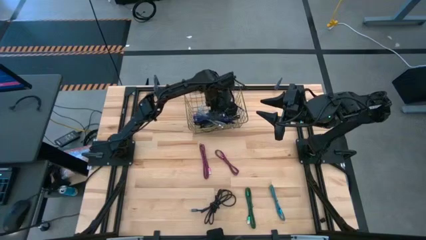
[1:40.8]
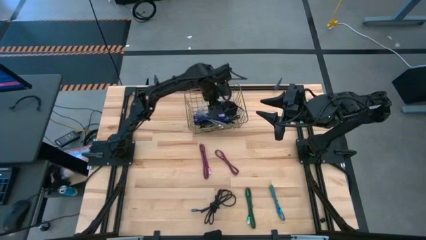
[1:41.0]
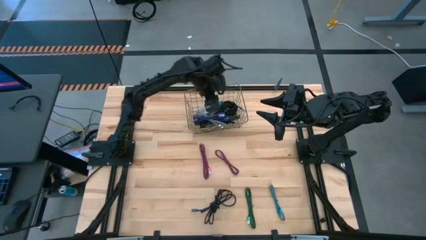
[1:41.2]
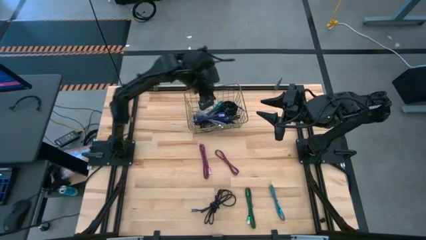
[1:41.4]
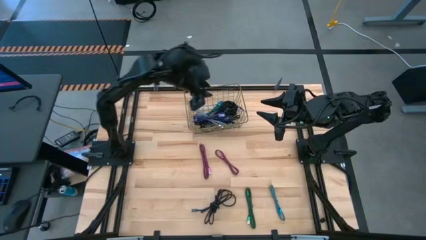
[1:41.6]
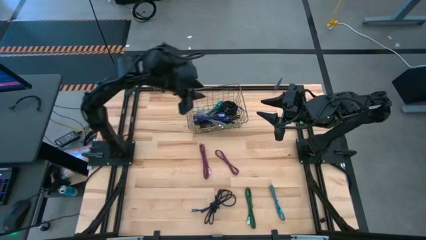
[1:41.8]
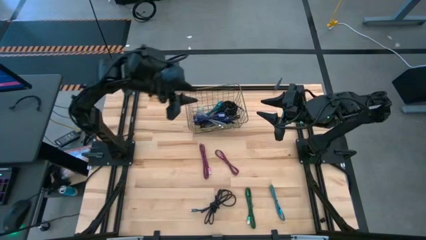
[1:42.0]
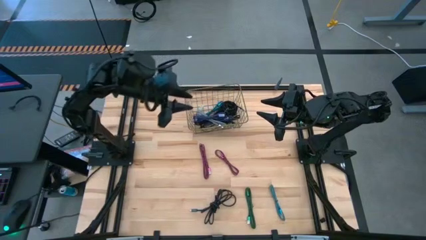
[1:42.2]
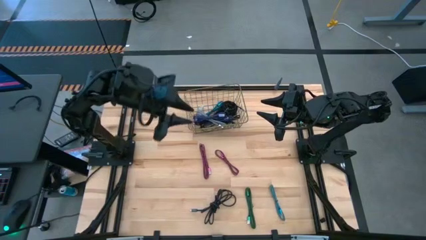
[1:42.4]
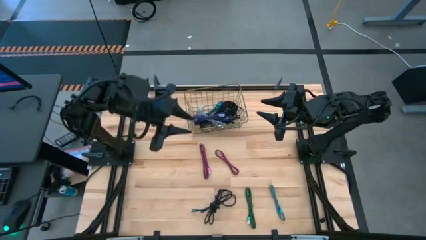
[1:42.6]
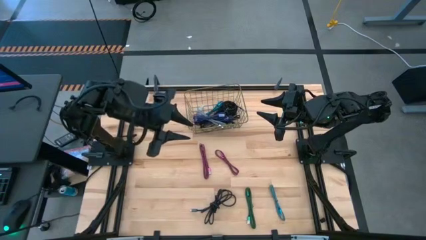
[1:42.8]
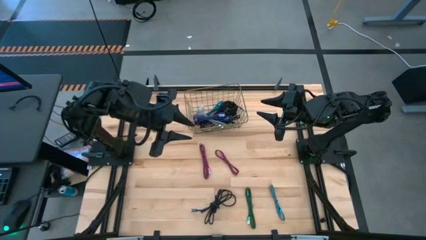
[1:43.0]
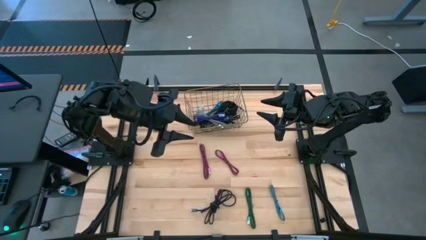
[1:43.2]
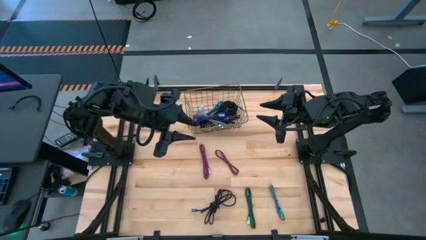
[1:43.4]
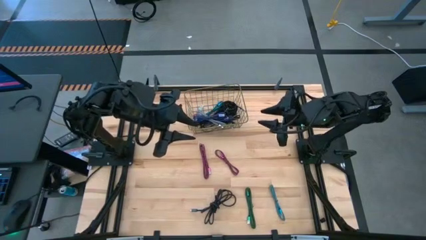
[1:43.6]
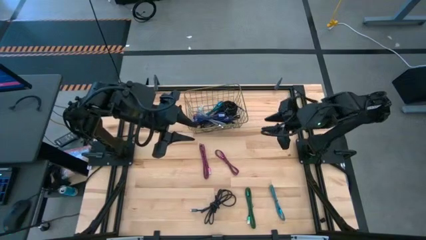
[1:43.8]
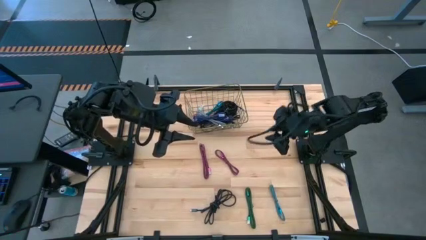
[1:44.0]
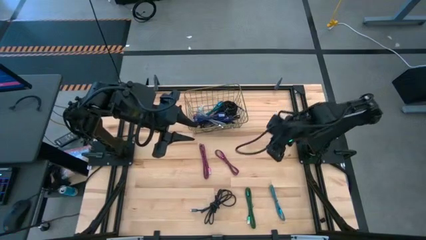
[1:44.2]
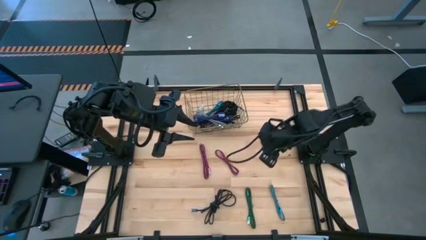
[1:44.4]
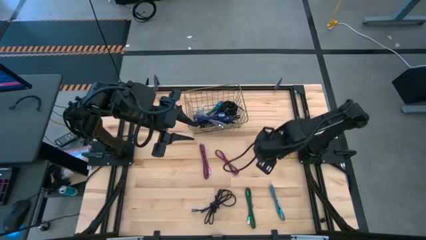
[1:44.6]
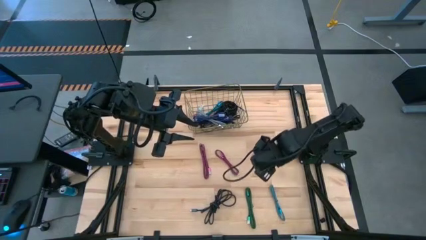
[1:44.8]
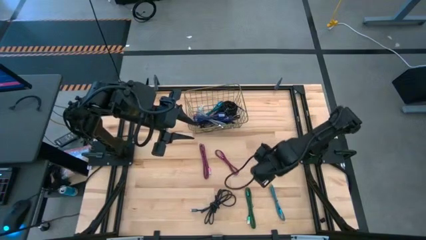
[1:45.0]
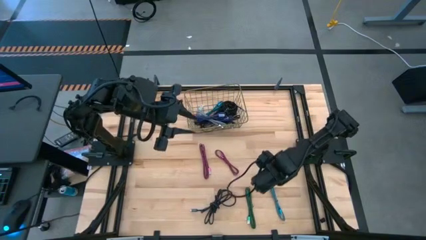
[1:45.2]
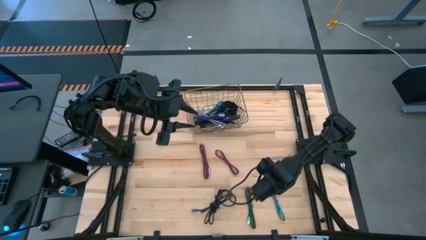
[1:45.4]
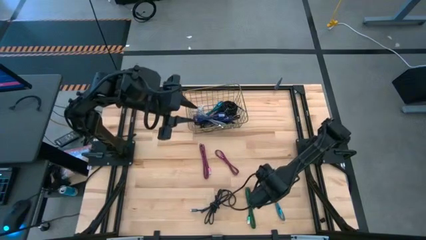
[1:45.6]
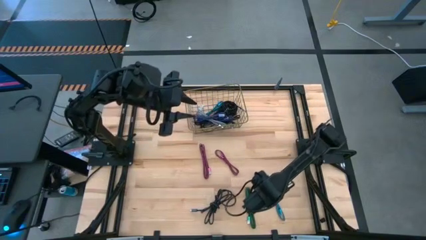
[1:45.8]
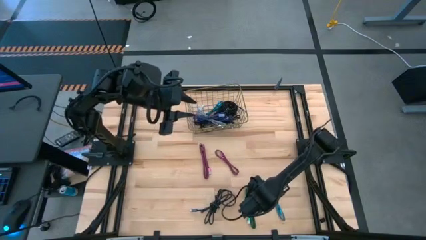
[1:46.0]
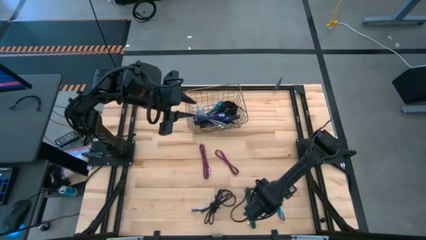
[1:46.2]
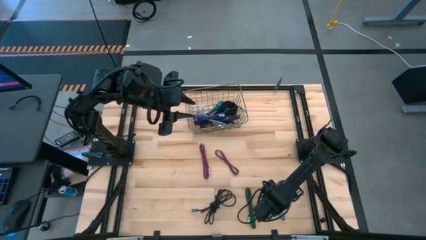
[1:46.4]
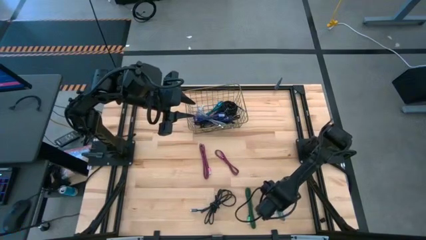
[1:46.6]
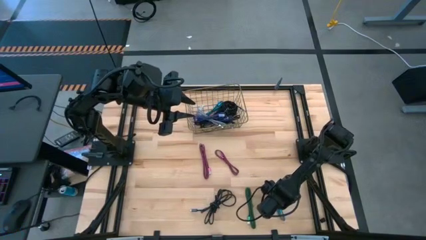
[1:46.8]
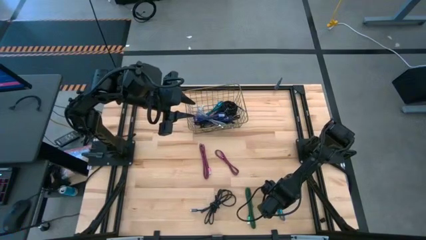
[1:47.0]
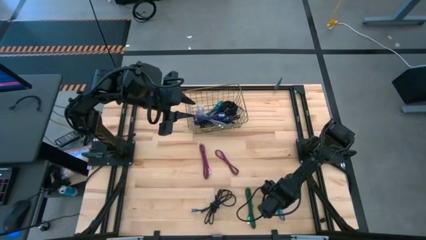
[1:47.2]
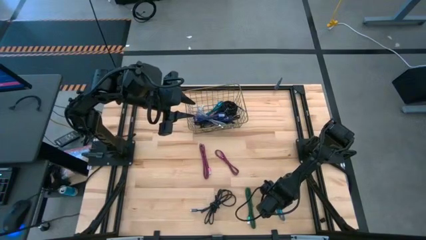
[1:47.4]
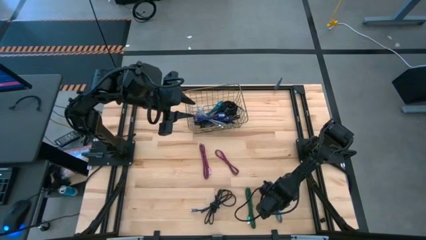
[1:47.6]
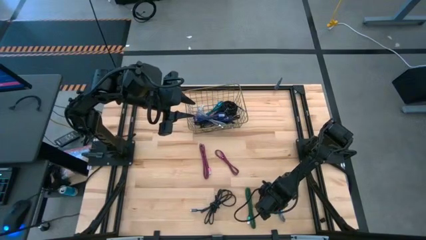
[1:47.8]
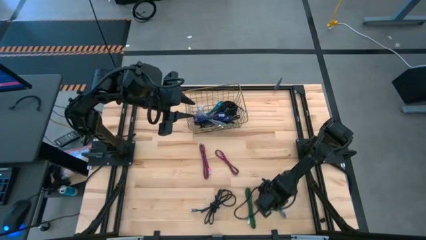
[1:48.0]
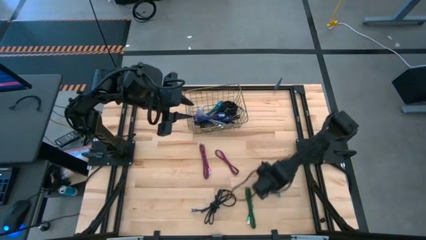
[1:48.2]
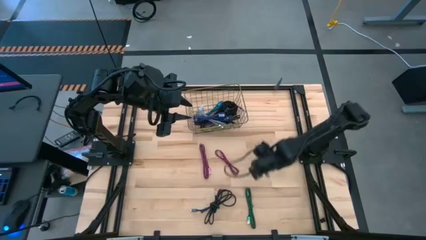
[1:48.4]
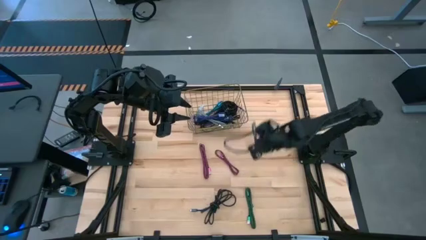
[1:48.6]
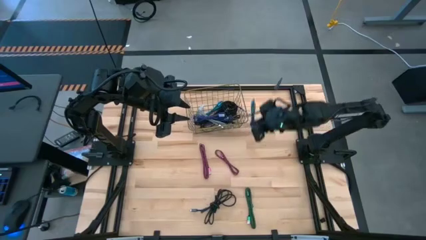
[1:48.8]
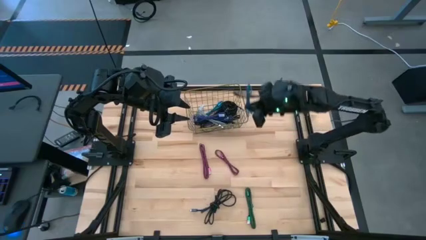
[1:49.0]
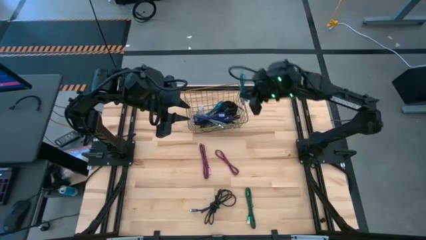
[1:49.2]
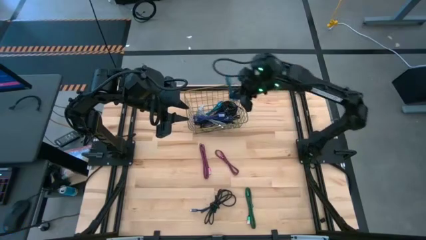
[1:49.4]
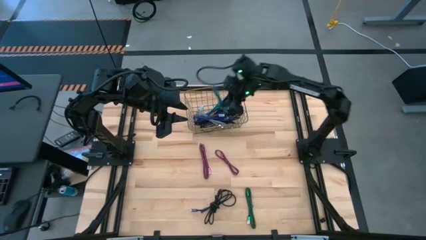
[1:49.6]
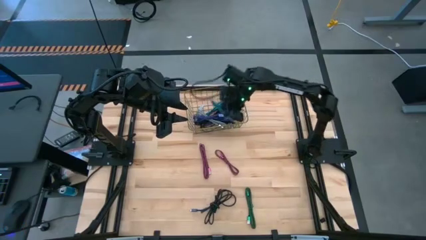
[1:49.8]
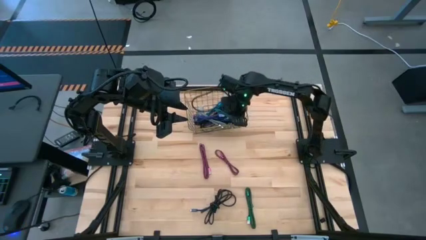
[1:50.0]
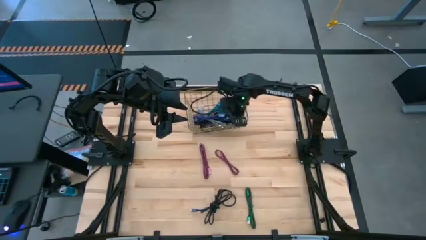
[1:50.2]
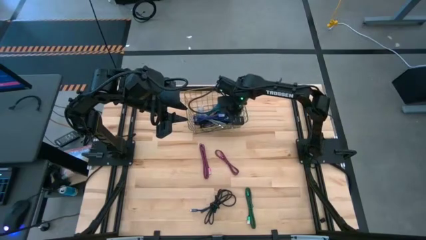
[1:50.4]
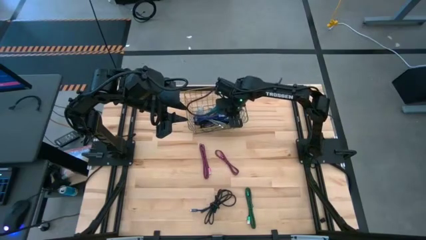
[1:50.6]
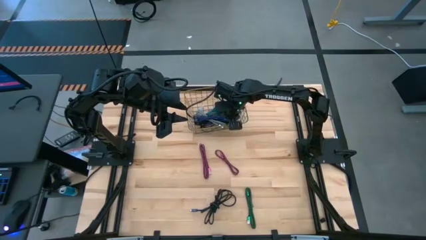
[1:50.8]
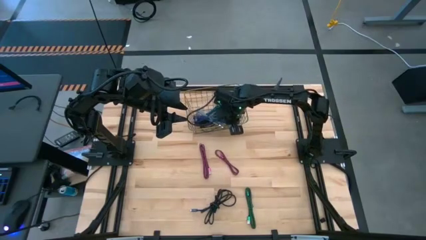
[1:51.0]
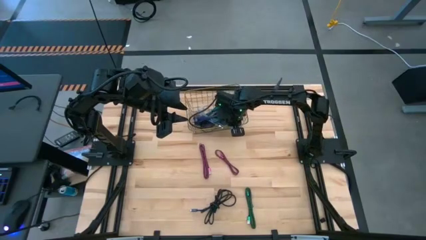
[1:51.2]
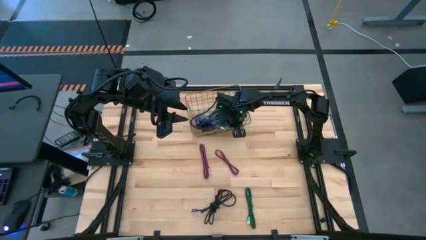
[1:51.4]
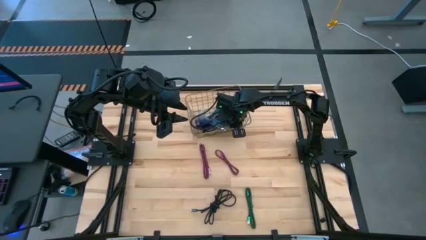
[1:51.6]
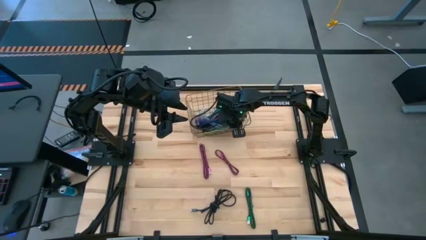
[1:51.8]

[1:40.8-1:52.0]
Task: Pick and place USB-C Cables
Put the light blue charger cable into the wire basket

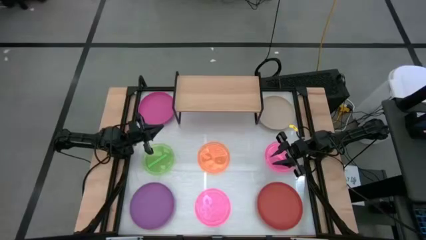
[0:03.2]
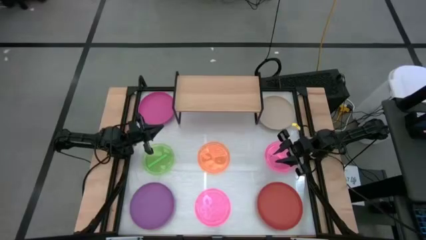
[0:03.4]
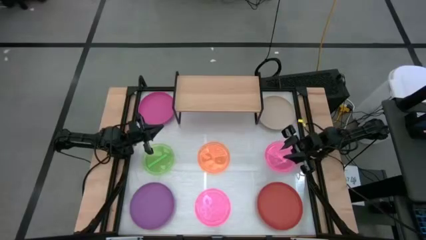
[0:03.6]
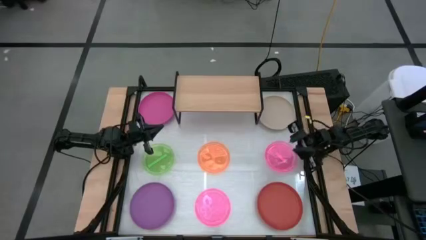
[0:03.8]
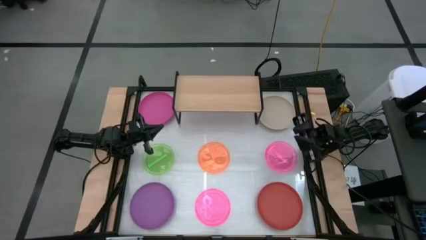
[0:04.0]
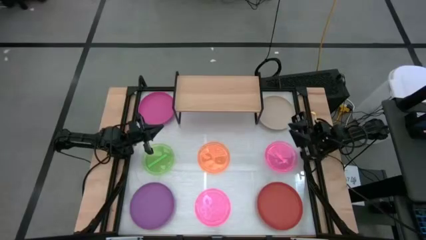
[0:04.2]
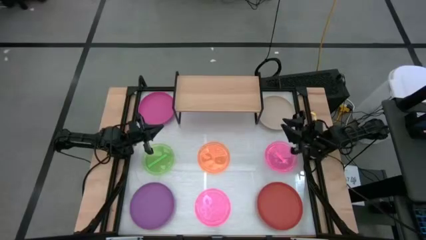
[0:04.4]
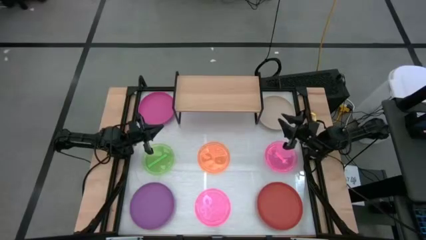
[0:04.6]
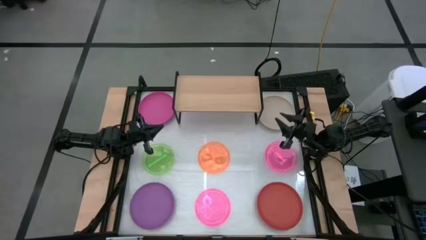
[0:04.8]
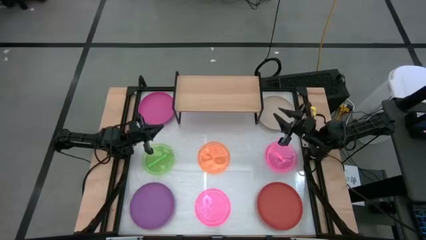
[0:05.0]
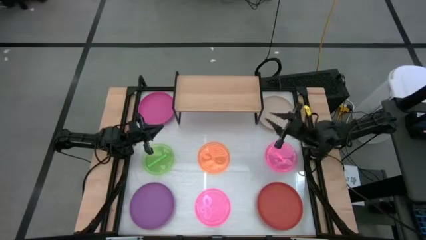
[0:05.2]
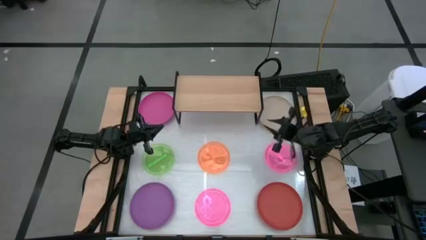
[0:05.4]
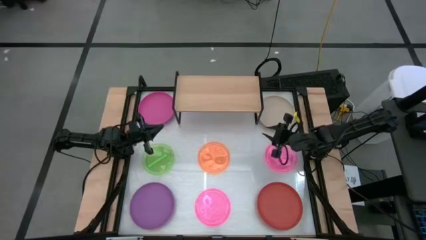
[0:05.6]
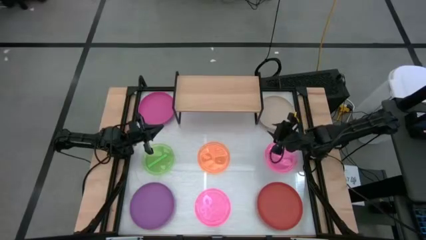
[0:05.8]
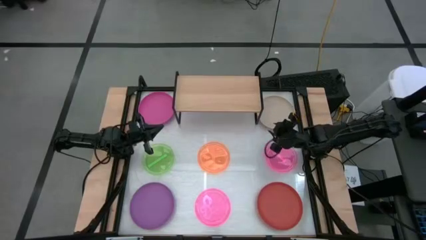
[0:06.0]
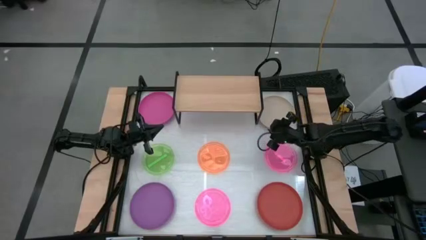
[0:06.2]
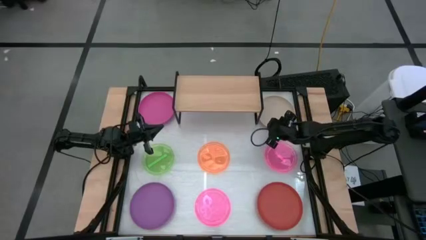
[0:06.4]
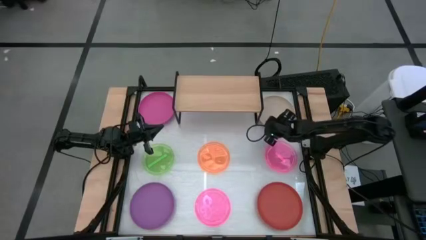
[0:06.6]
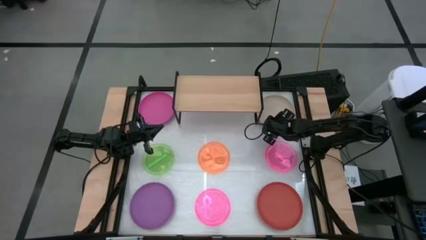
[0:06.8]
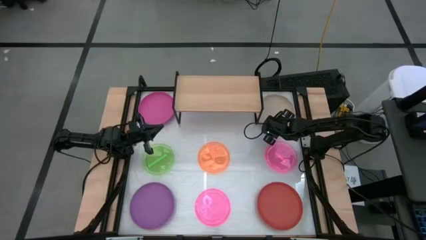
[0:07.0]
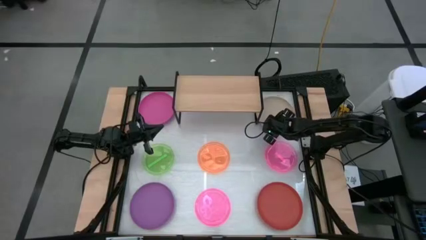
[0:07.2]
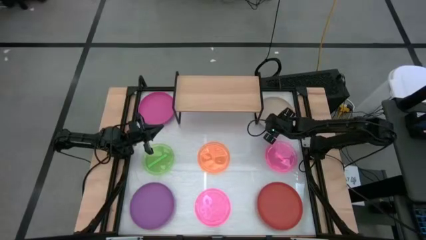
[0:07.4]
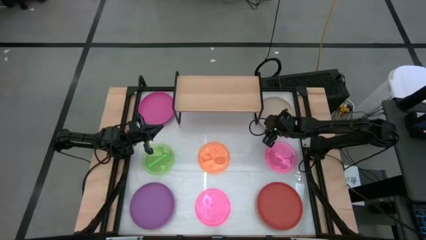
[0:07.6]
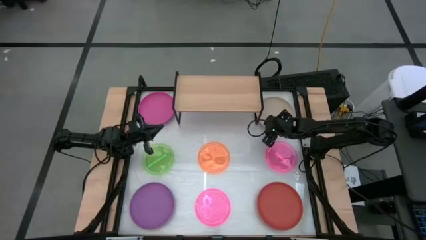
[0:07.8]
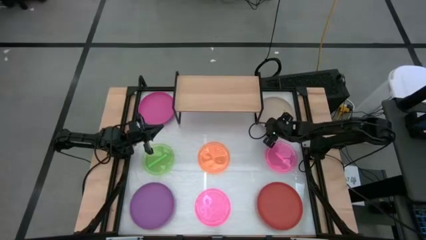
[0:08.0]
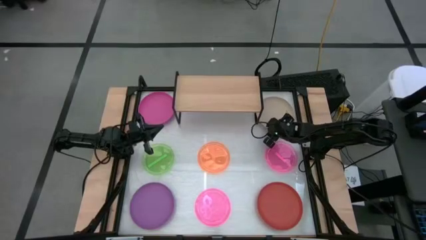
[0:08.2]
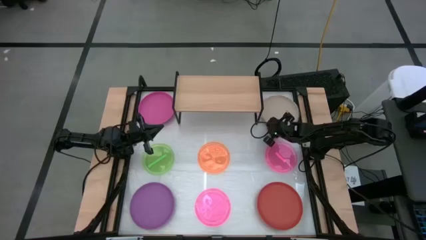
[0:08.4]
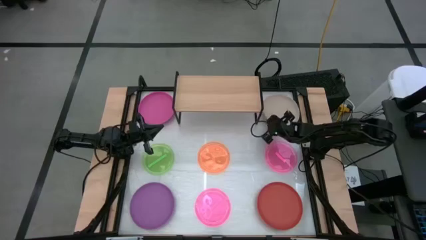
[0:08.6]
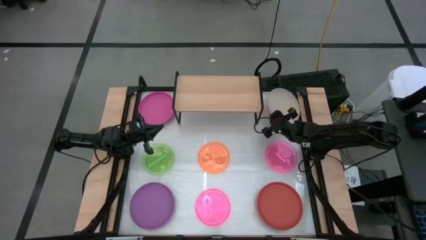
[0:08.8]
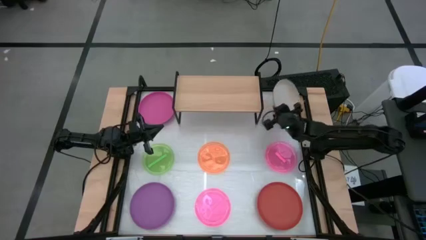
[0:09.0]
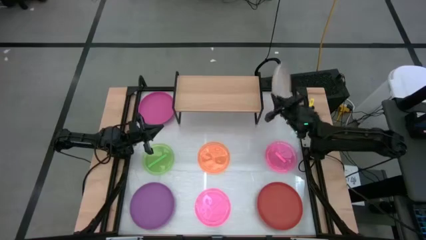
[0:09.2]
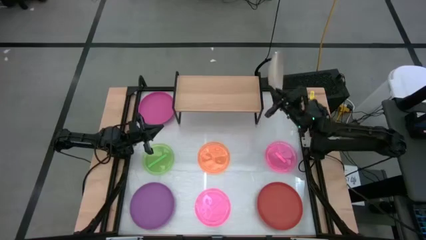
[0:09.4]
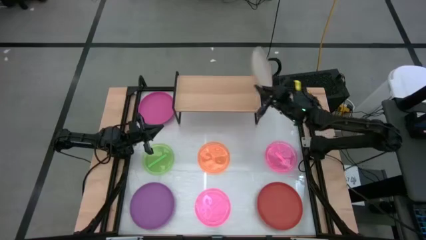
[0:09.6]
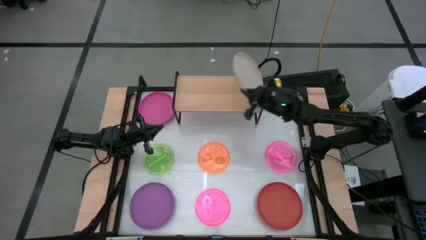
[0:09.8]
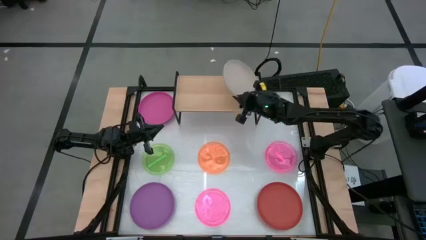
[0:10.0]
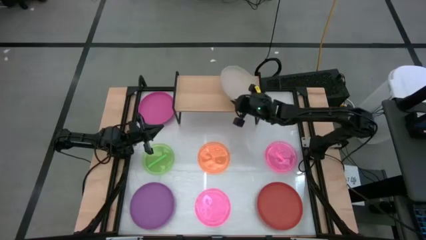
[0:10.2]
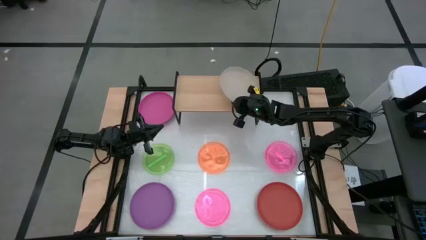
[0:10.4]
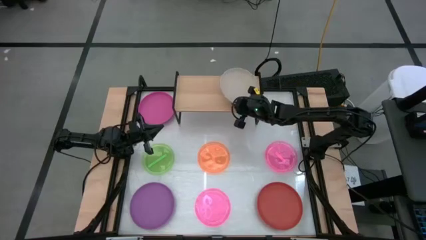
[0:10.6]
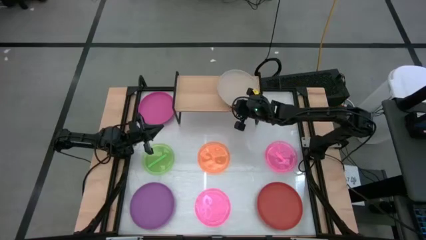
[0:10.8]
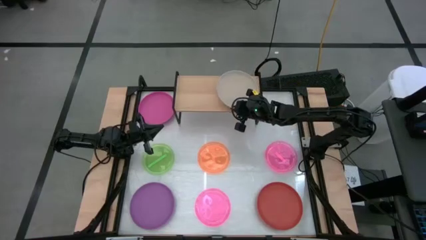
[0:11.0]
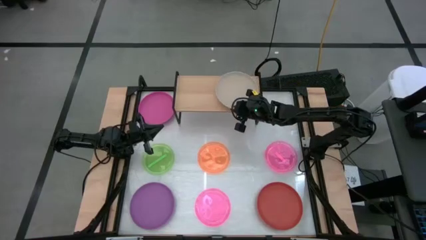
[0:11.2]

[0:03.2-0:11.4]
Task: Place and stack plates onto a shelf
Put the gray plate to the right on the shelf
